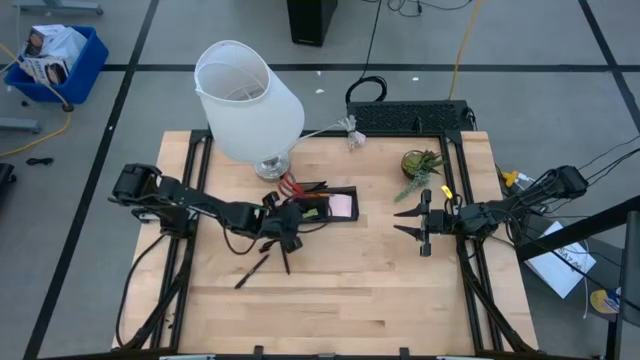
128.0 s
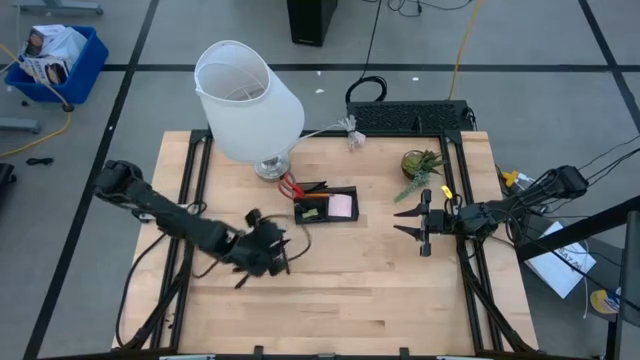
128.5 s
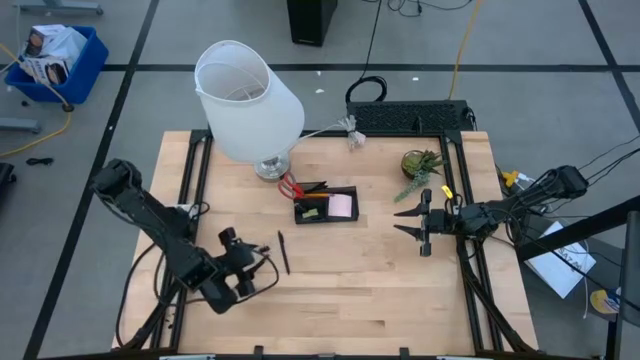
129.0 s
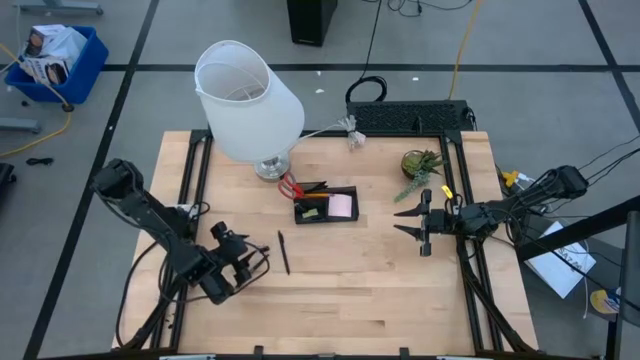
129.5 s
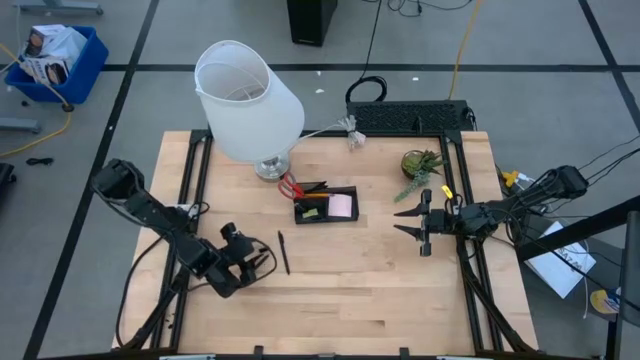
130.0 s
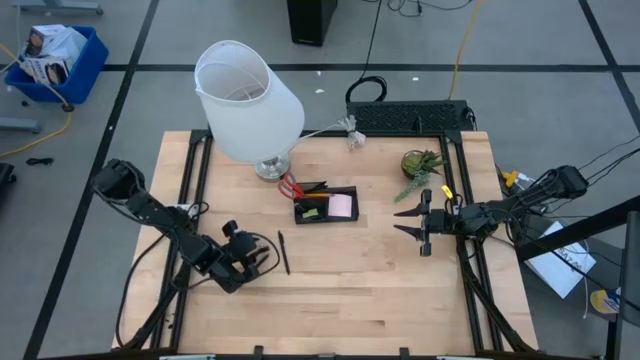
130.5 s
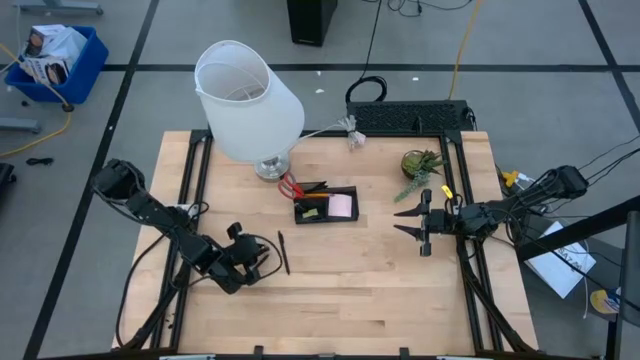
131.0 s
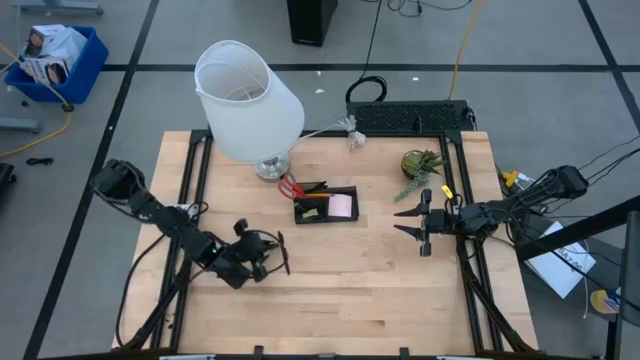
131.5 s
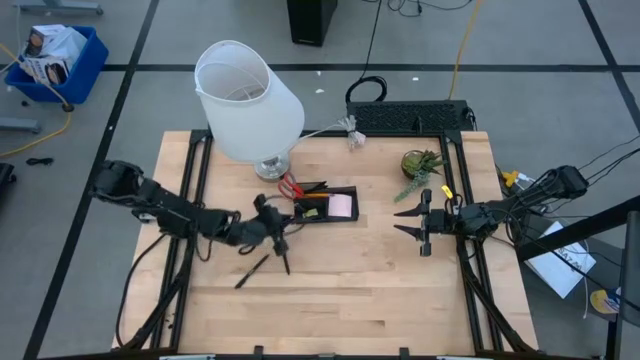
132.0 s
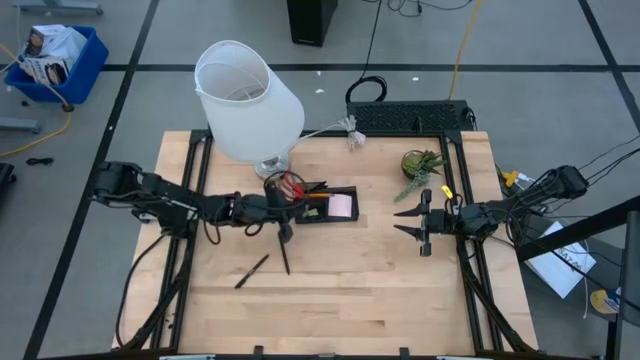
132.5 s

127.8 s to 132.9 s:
Task: Pick and place office supplies into organizer
Put the black binder clip into the bottom left compartment of the desk organizer

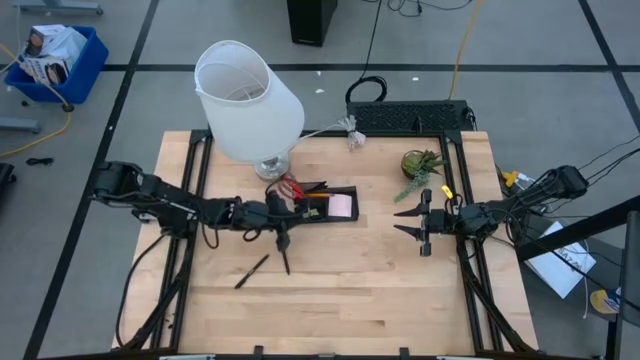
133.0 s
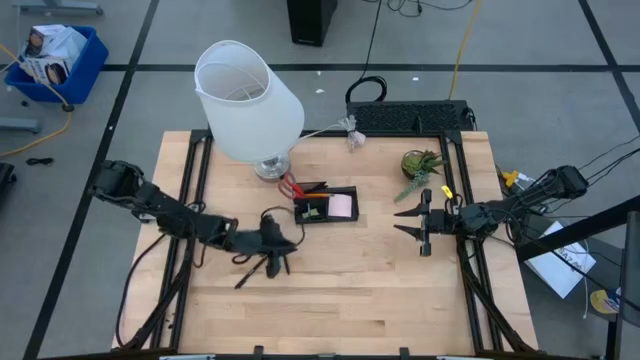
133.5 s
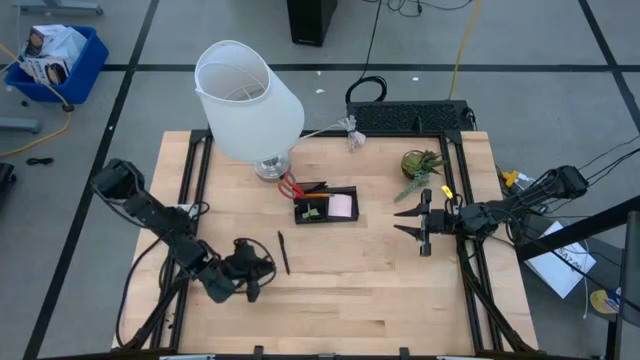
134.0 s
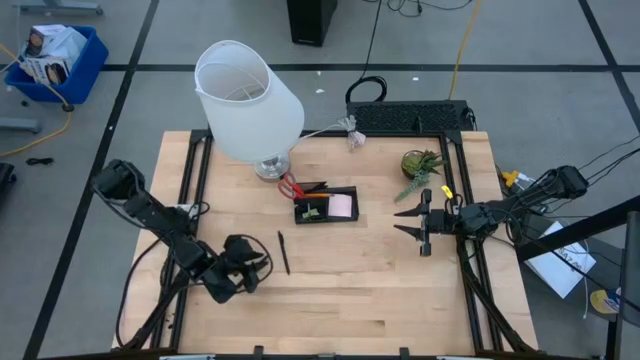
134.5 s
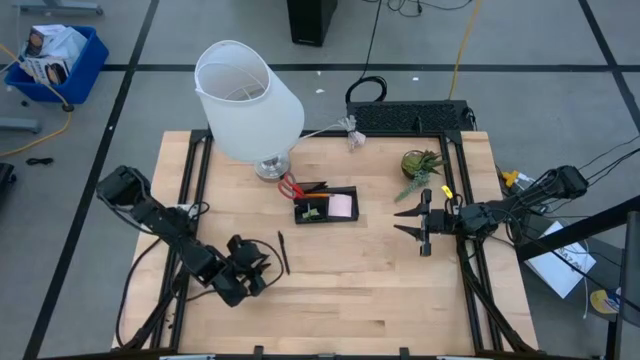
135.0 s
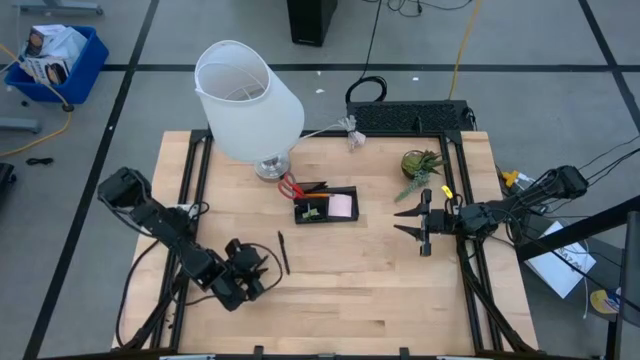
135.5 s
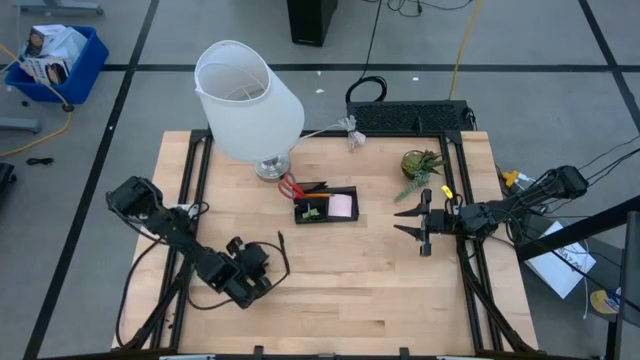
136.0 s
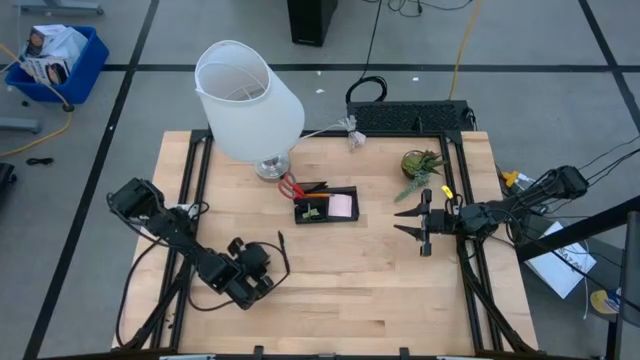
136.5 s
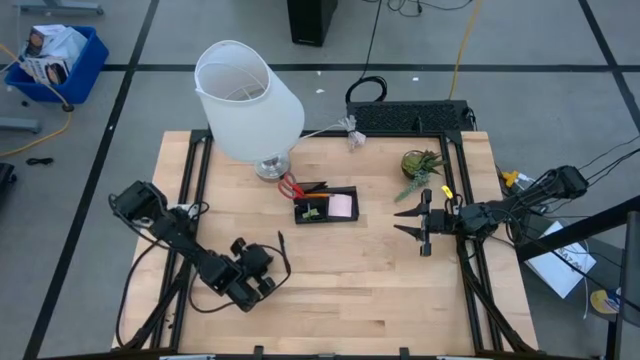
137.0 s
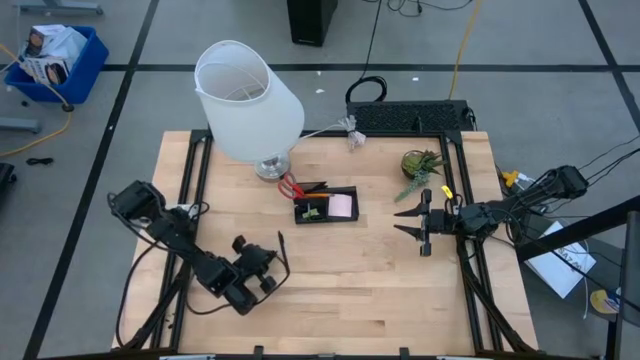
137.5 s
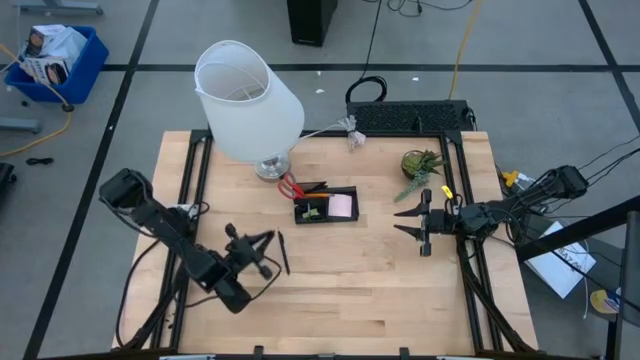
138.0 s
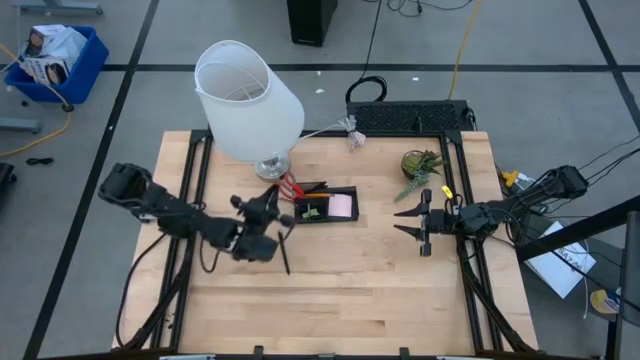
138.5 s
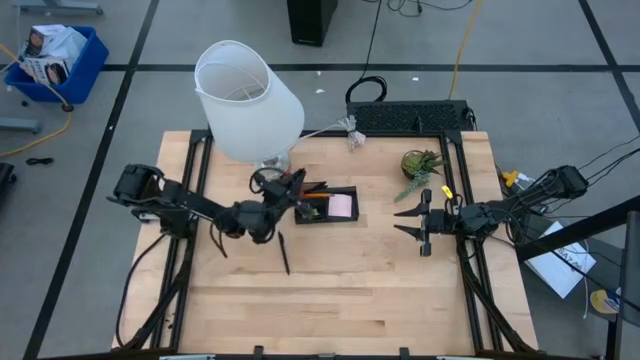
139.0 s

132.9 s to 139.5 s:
Put the left black pen into the top left compartment of the desk organizer

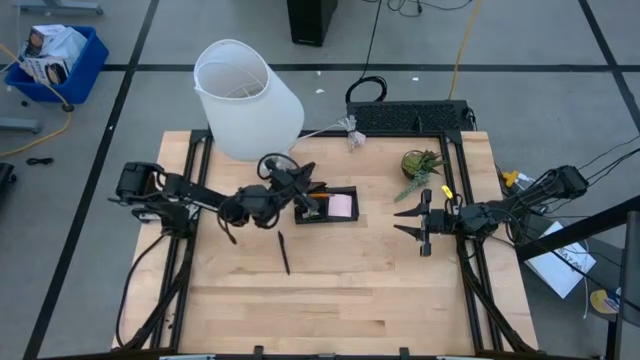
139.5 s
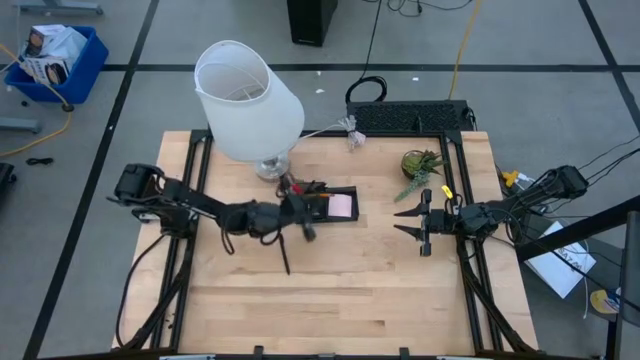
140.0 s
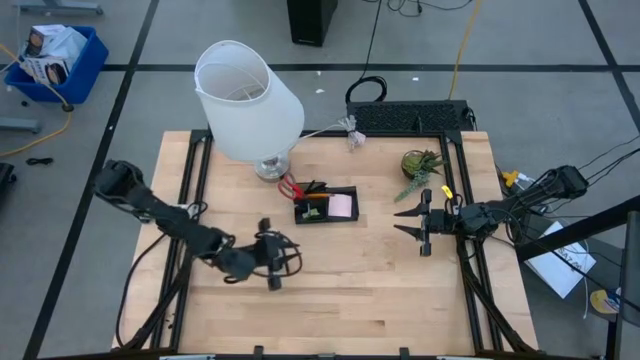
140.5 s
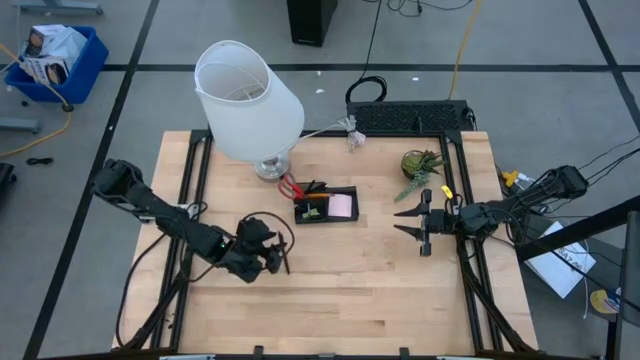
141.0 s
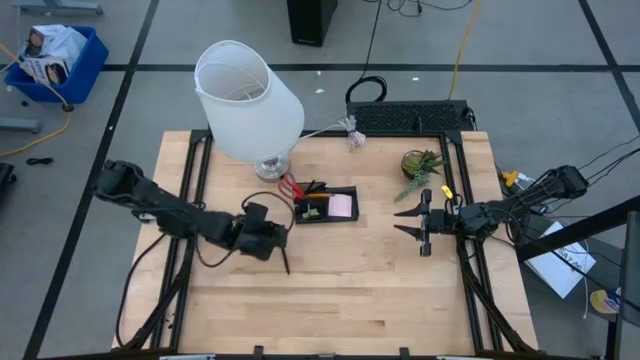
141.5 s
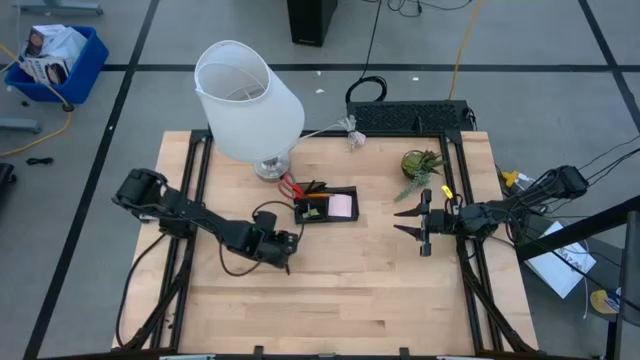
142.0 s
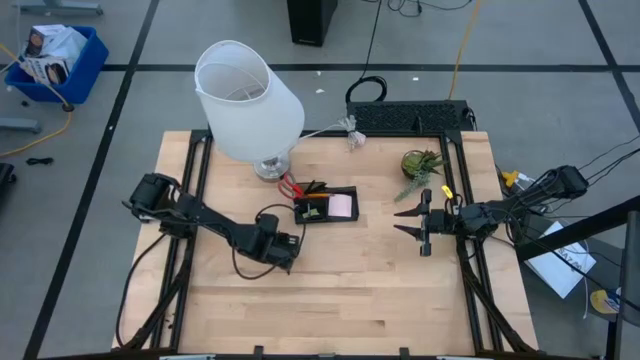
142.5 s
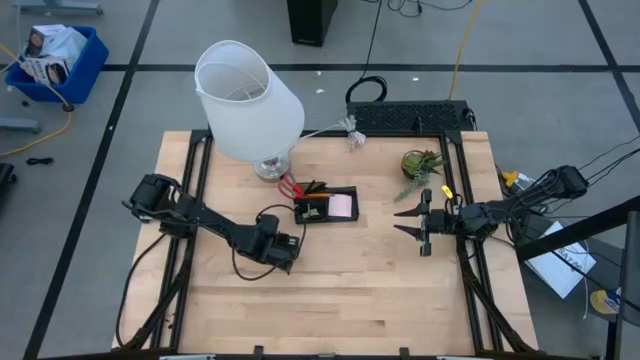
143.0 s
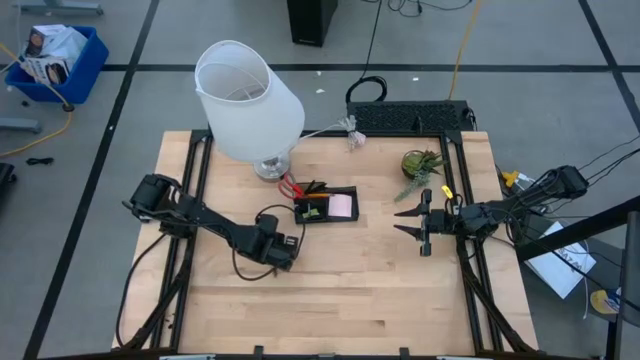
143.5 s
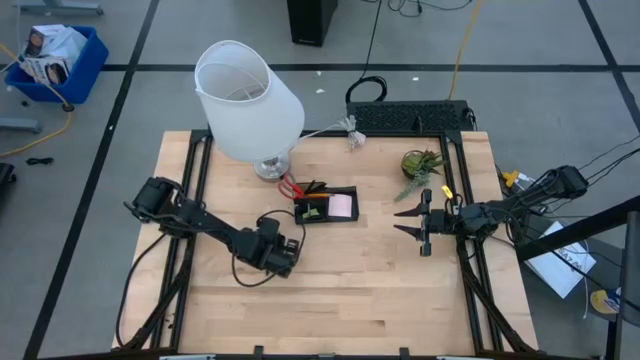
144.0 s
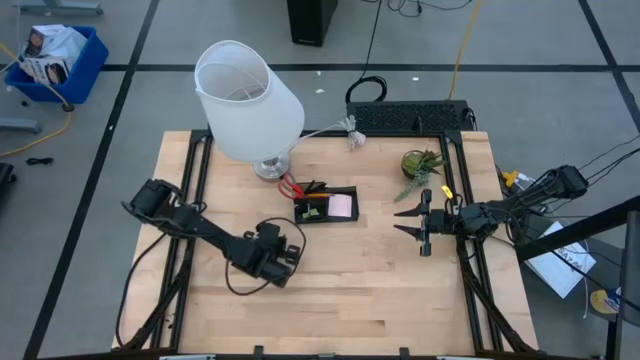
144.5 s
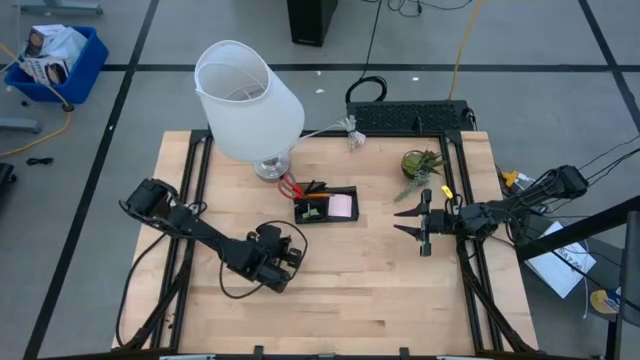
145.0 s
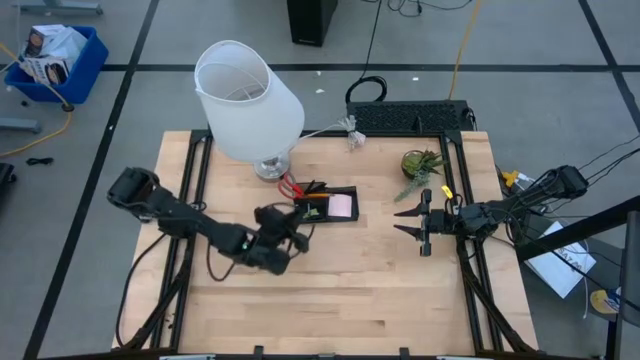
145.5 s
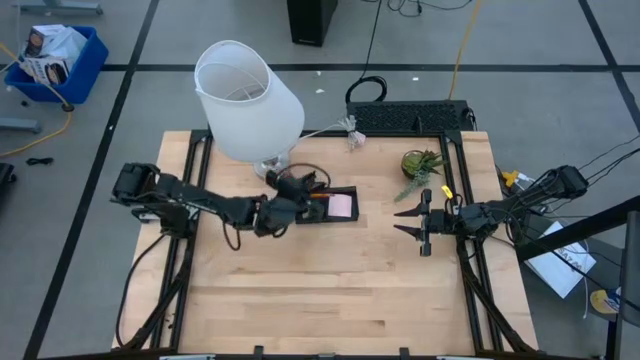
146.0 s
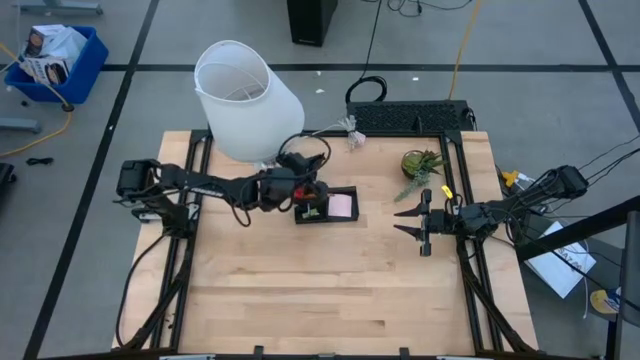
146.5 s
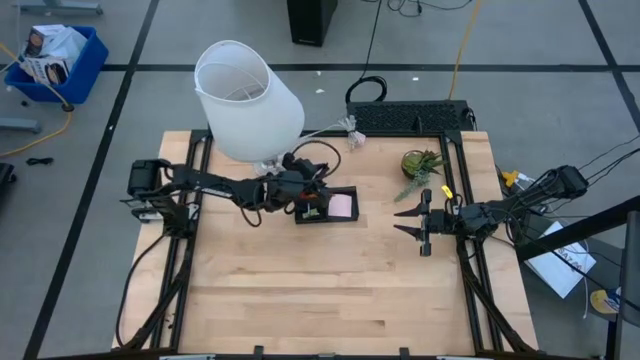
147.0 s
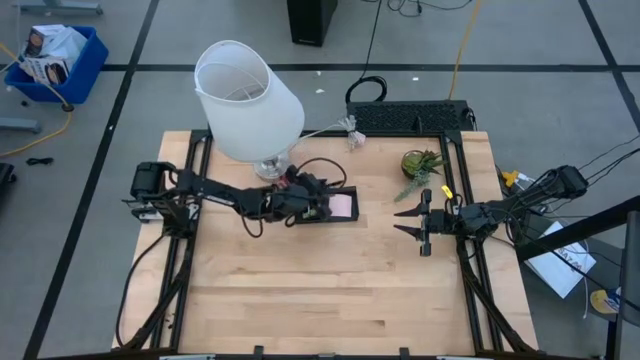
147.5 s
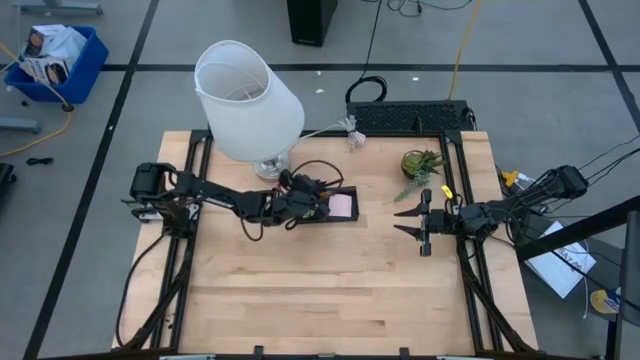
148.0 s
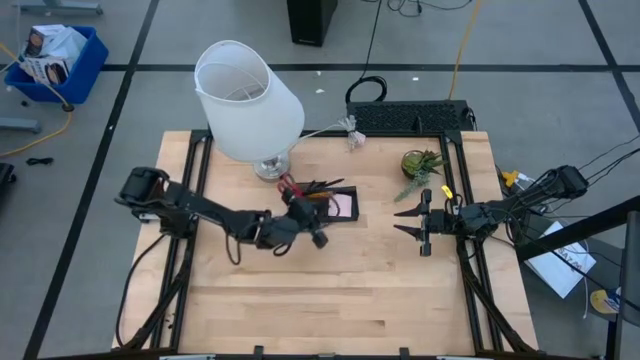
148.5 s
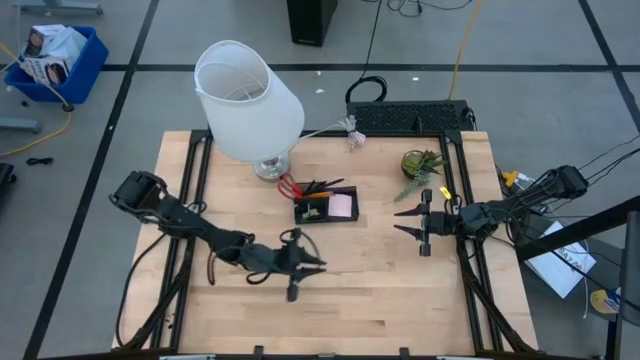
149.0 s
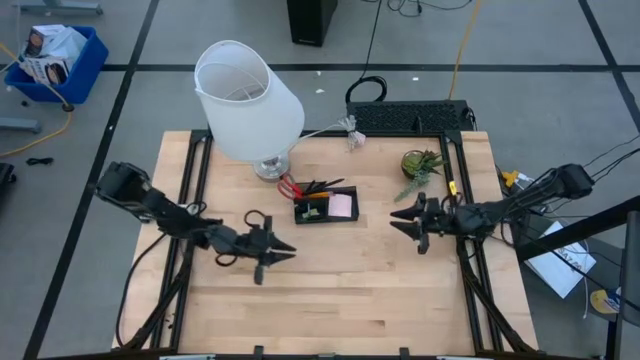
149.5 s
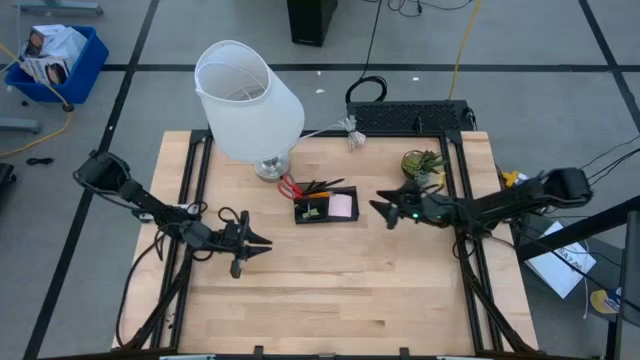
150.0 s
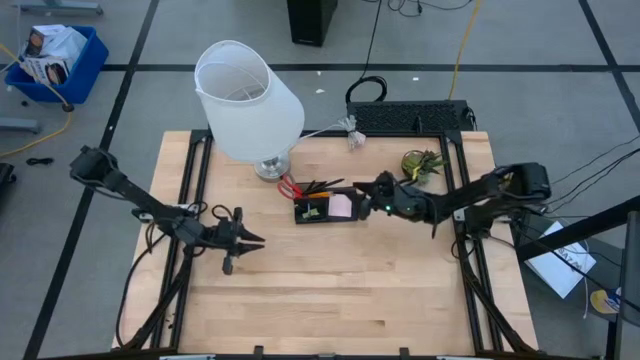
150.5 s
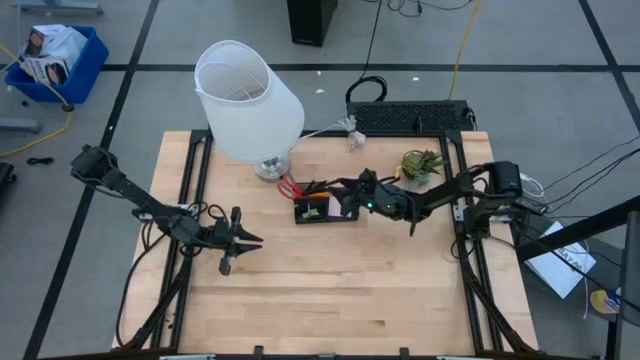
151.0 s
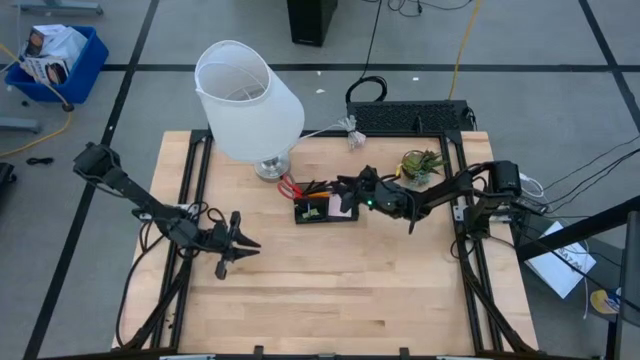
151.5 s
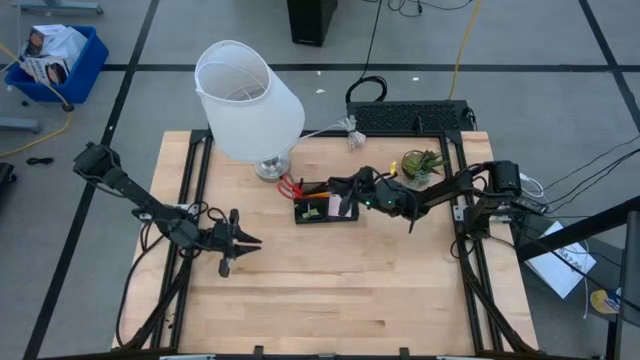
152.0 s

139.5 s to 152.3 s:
Put the black pen into the top left compartment of the desk organizer
